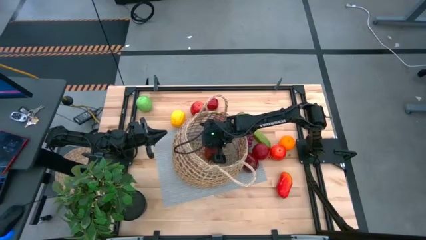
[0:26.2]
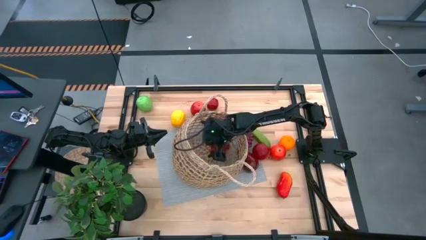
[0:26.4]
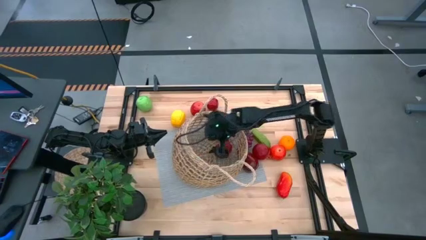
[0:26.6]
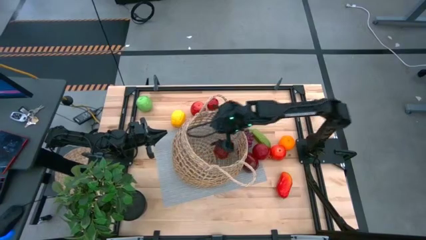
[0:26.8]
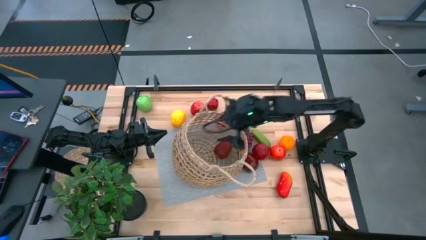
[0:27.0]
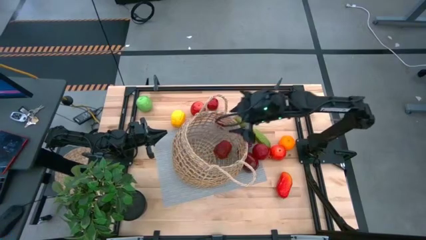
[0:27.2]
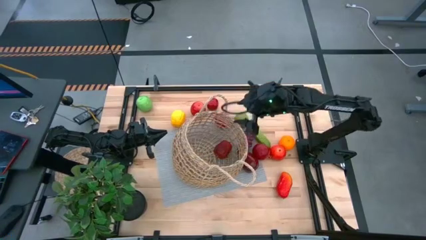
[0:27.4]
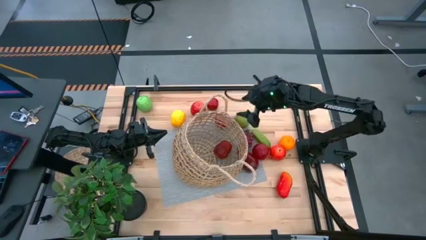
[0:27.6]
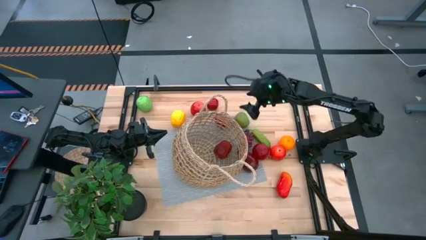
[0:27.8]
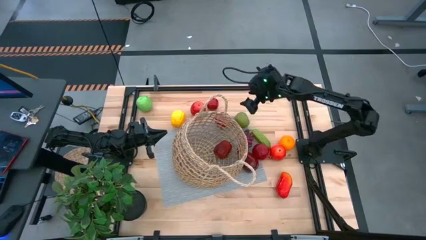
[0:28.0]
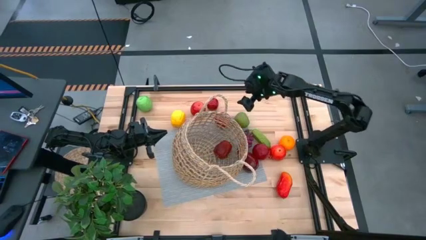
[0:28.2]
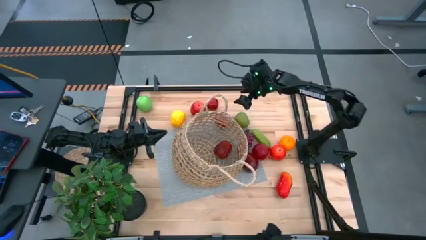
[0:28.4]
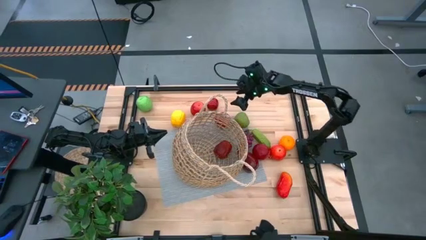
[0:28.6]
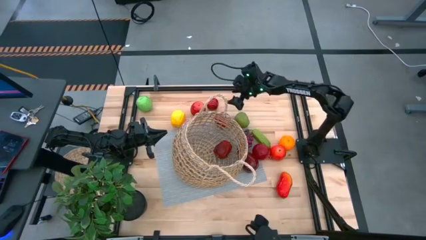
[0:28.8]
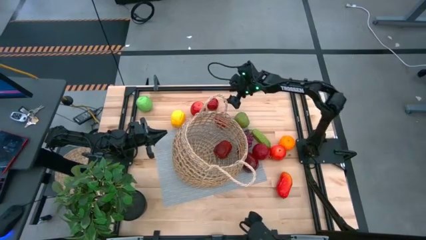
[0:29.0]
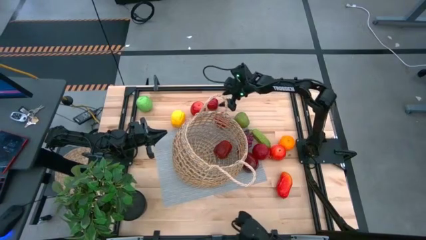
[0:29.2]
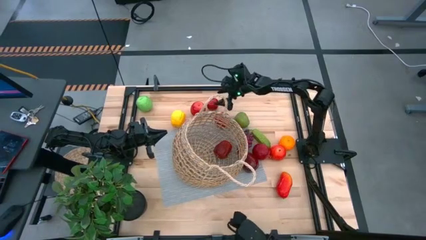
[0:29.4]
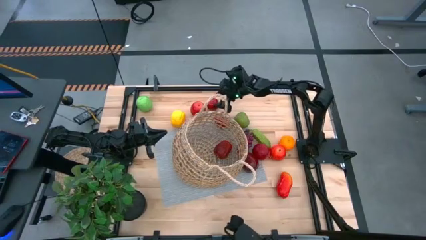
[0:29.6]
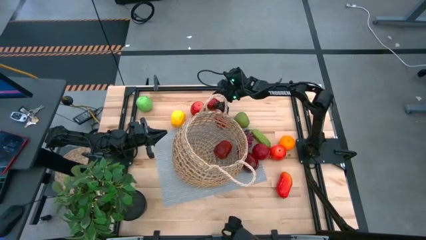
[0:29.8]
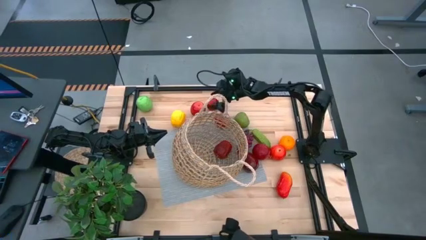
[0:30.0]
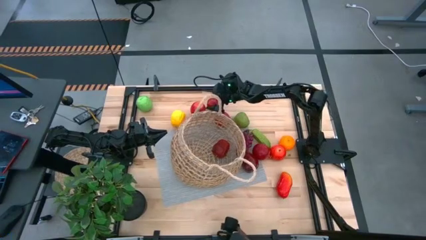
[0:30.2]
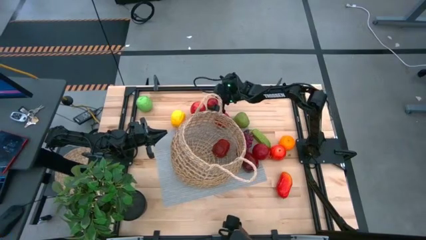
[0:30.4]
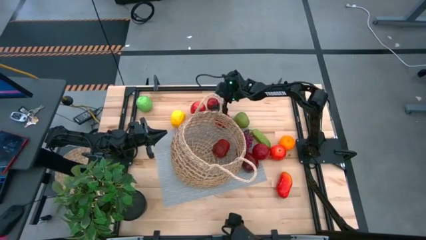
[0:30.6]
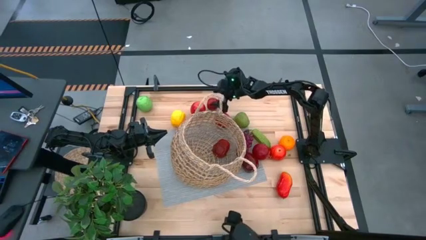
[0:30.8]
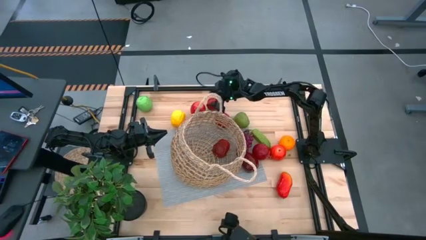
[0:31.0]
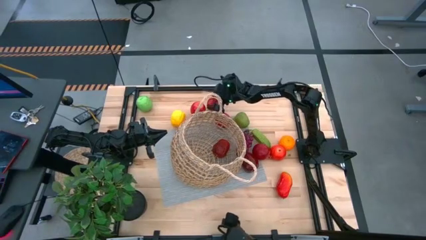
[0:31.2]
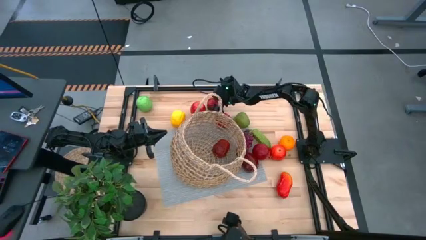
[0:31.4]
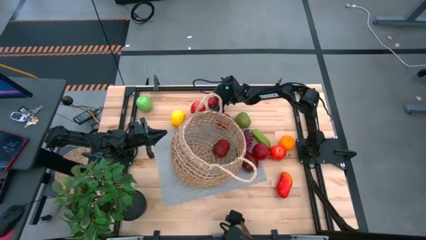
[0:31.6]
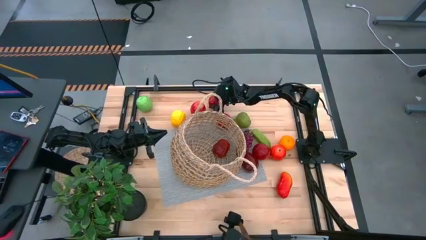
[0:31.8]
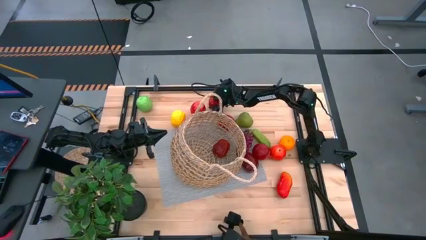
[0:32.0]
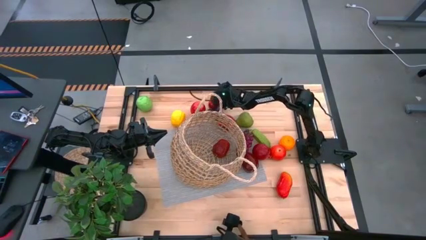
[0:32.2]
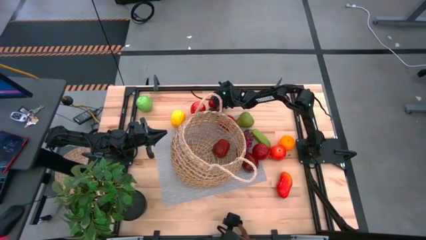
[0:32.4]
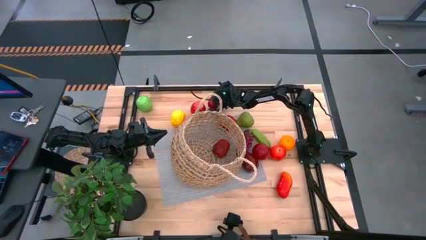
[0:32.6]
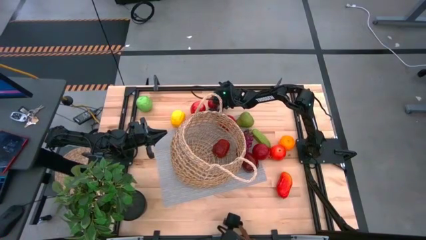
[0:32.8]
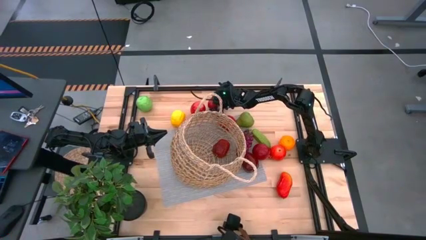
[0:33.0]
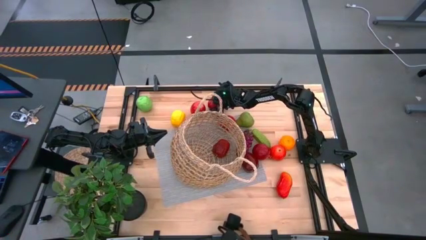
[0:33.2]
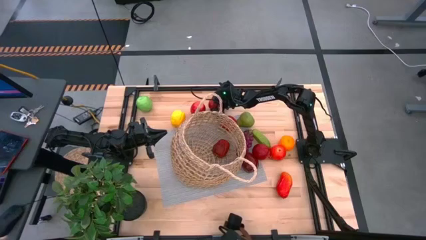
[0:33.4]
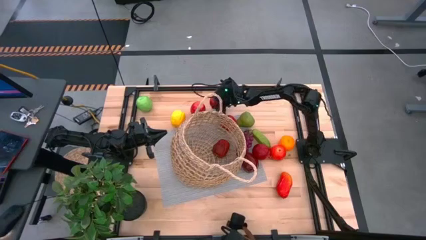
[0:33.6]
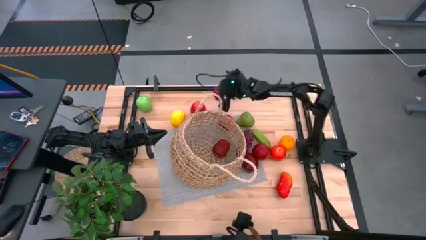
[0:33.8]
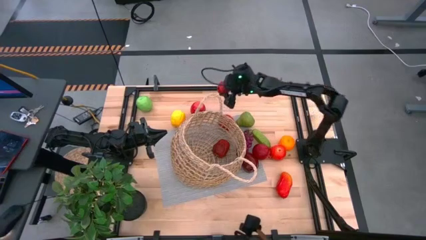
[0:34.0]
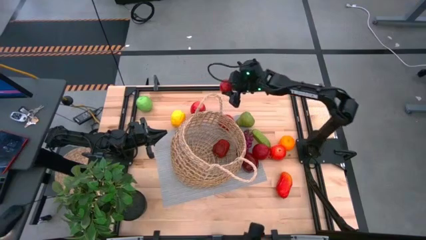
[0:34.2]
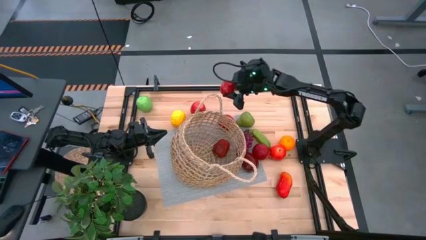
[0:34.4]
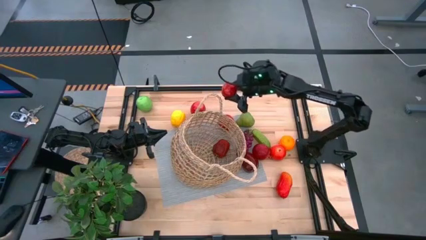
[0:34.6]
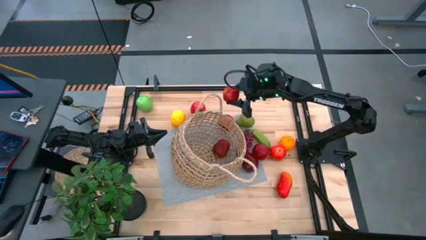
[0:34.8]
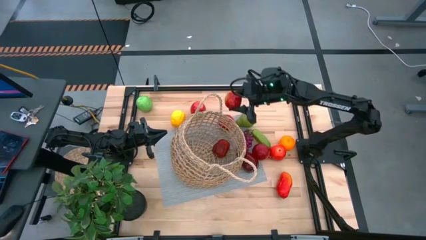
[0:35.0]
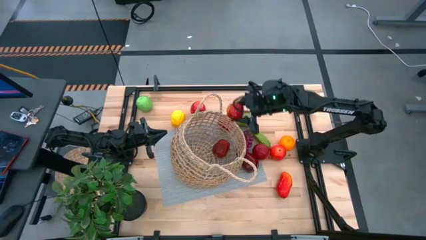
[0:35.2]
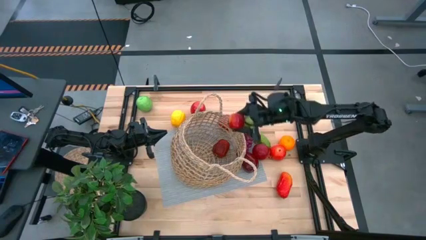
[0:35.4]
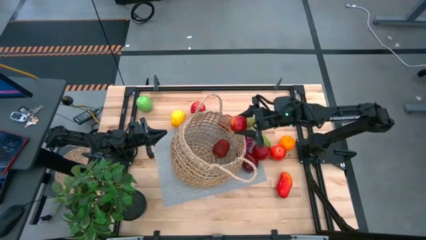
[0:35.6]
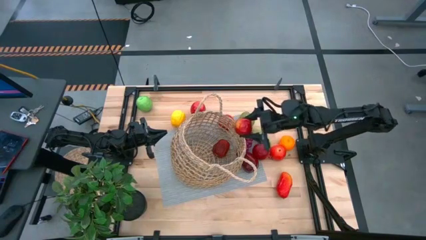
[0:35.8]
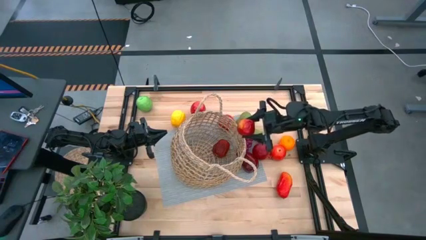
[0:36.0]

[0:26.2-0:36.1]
Task: Build produce basket
Put the peach into the basket

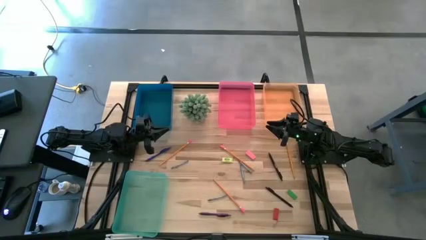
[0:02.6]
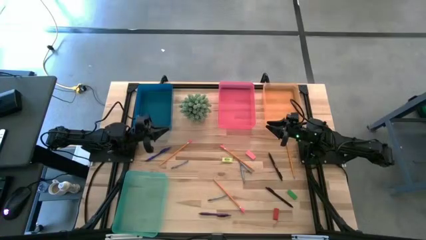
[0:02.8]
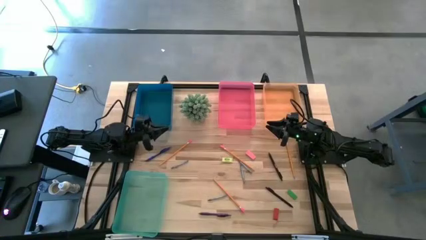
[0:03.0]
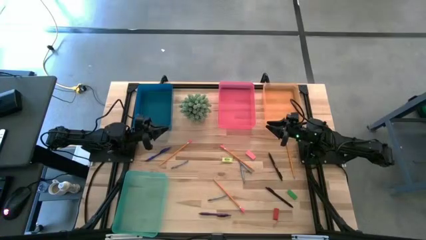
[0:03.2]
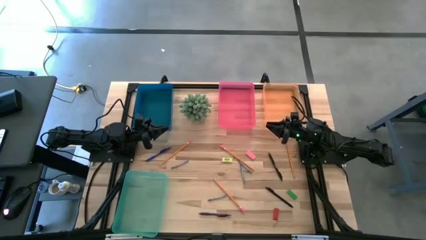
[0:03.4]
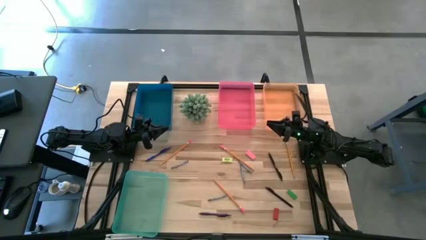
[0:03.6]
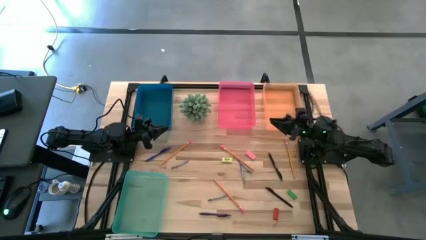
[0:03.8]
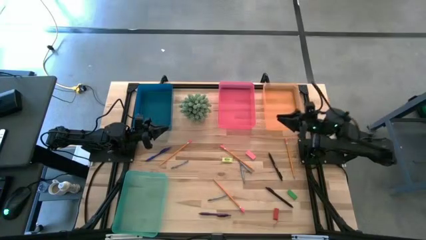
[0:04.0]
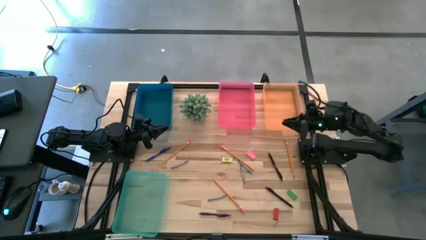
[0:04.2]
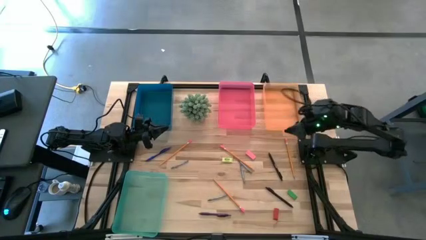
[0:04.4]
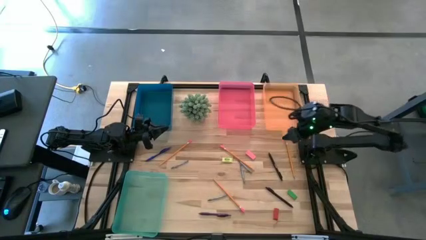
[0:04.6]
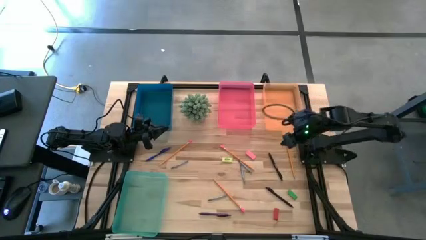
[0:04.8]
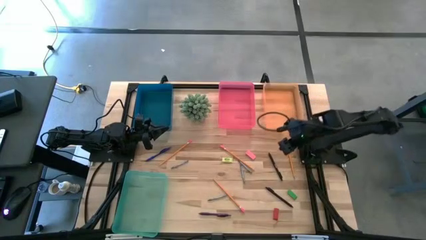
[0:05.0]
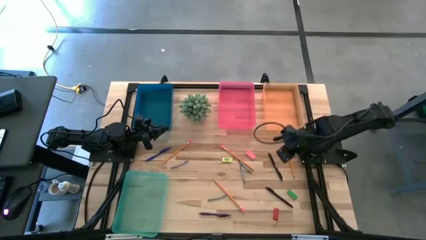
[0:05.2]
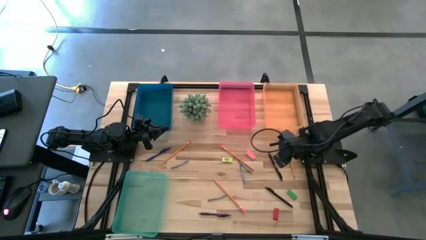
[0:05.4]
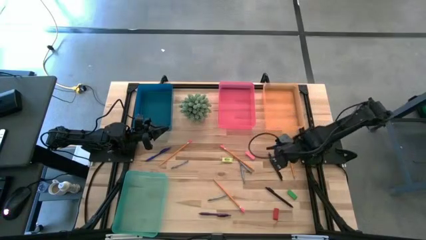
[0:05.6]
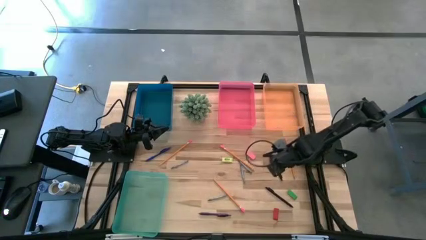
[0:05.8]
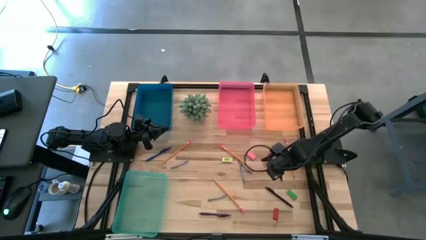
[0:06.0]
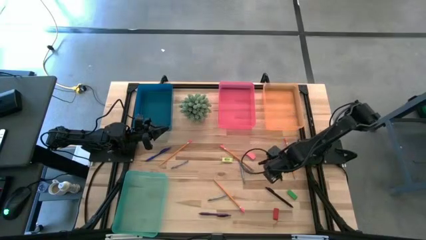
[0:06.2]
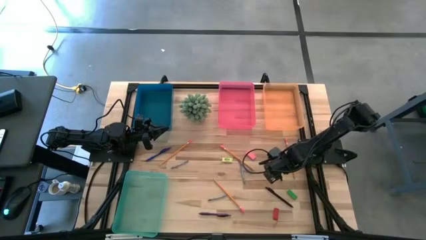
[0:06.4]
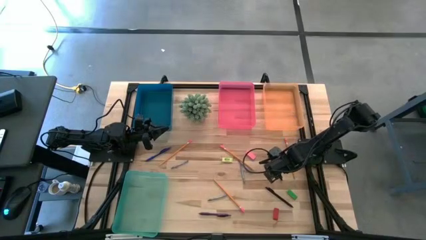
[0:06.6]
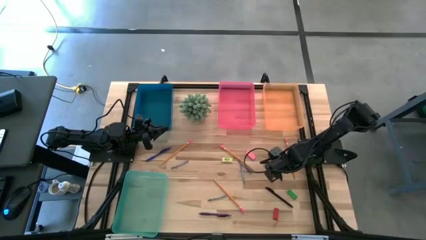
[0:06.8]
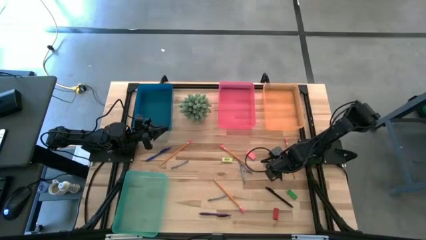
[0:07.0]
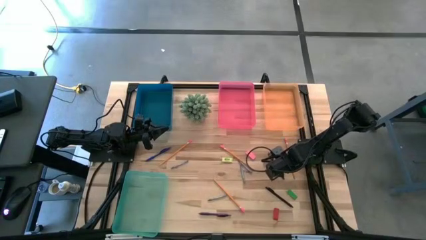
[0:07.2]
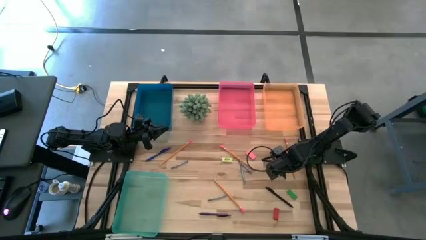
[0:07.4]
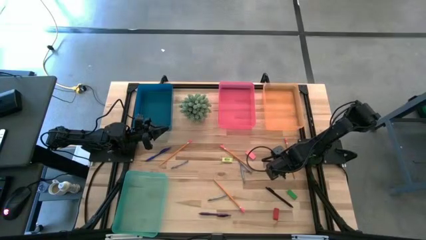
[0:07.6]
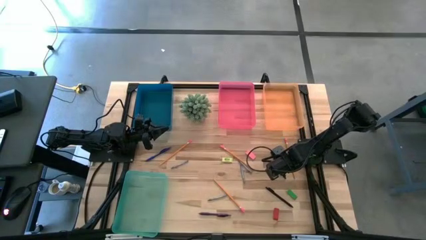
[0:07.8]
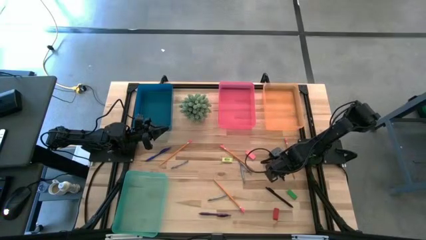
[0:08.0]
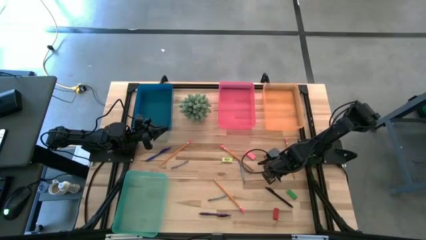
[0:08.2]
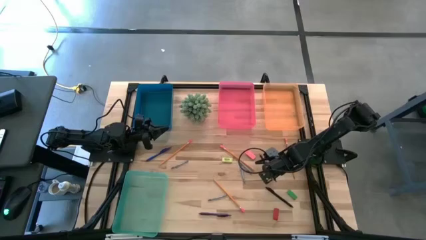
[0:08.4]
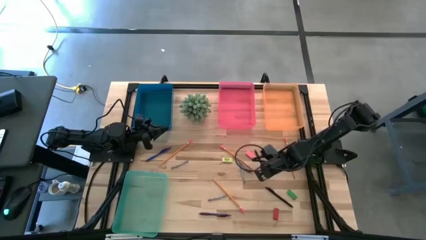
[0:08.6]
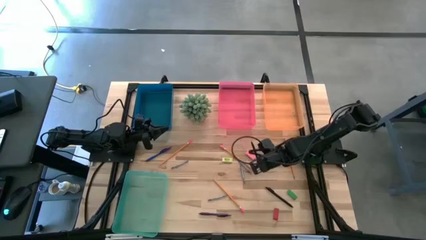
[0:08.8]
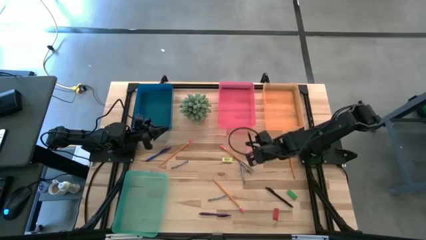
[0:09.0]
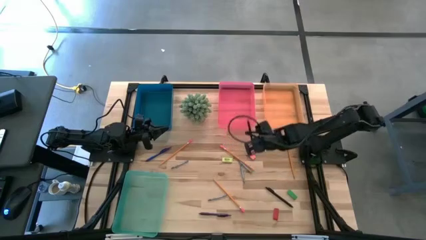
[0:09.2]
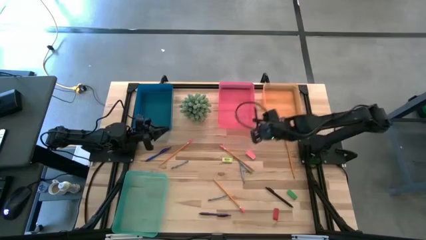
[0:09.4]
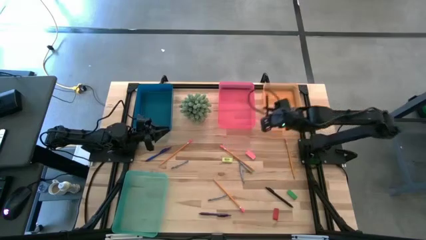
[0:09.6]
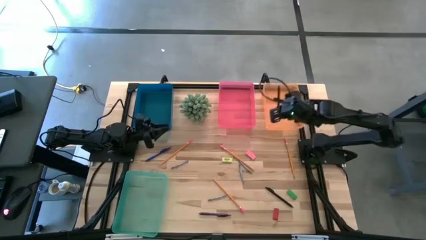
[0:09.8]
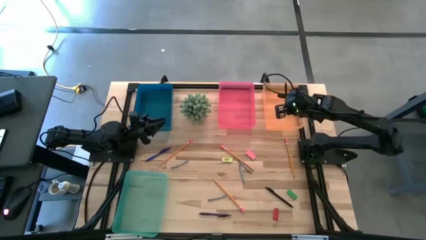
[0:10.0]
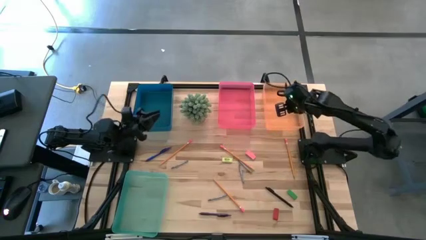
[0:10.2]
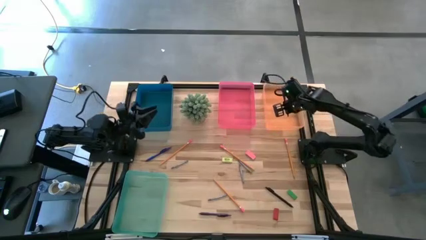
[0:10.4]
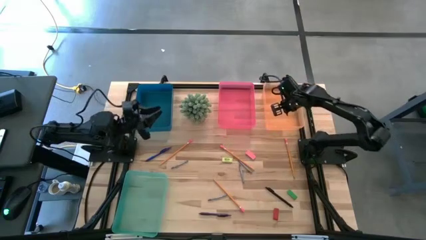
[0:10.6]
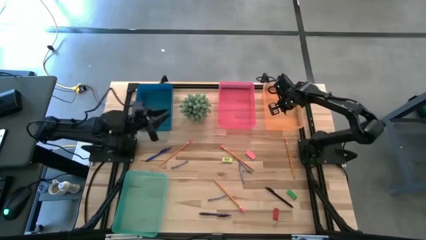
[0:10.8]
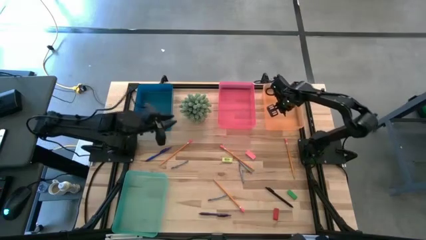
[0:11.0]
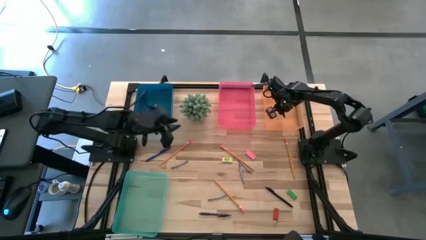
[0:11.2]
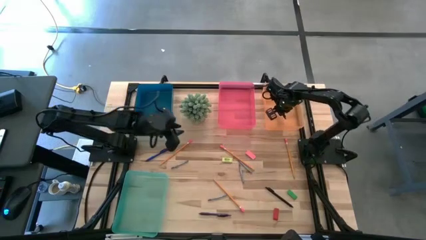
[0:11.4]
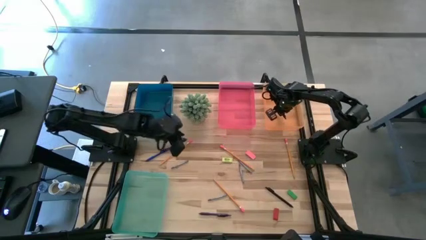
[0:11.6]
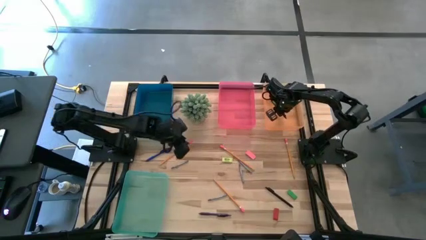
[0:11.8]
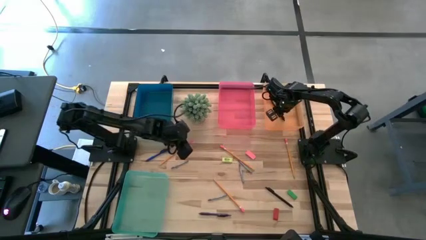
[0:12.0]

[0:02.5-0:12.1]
Task: Sort crayons/erasers/pens/pencils in bins
Put the black pen into the orange bin
